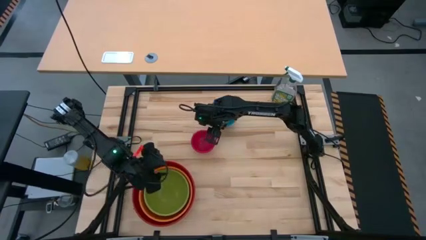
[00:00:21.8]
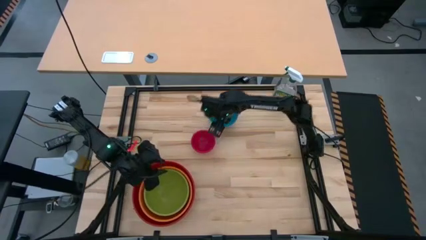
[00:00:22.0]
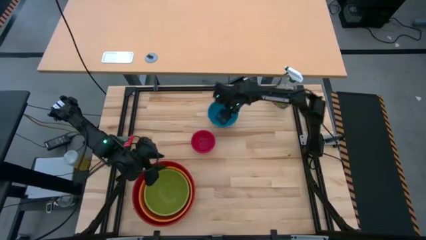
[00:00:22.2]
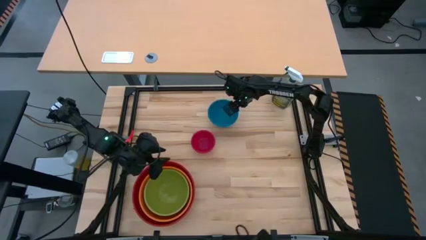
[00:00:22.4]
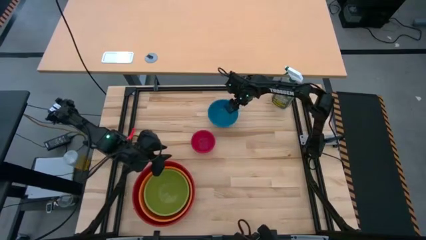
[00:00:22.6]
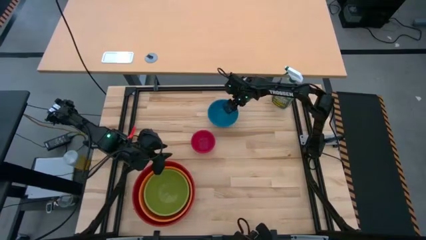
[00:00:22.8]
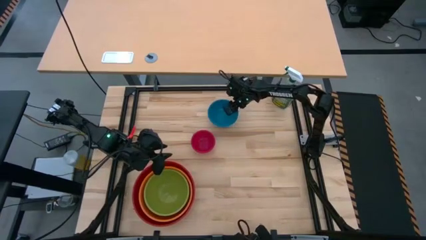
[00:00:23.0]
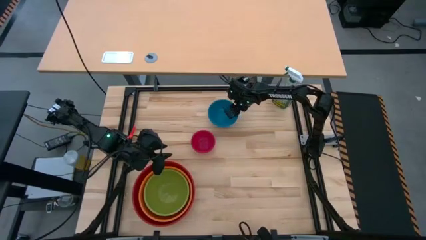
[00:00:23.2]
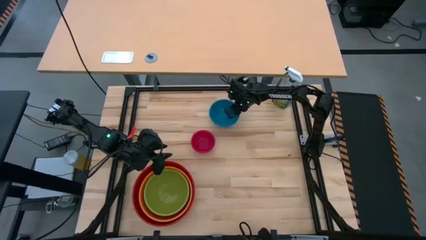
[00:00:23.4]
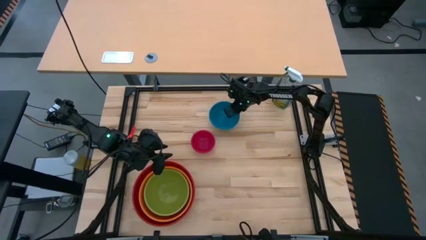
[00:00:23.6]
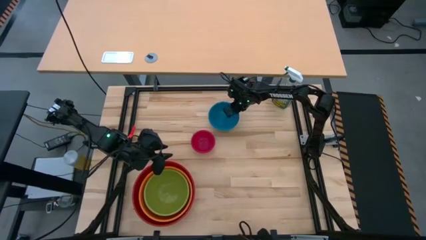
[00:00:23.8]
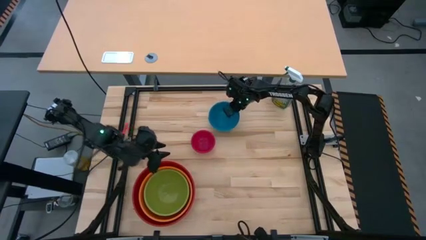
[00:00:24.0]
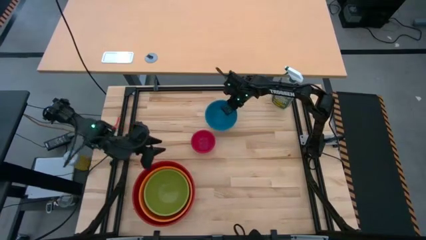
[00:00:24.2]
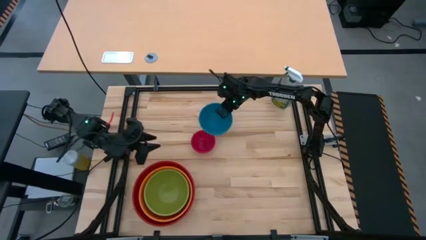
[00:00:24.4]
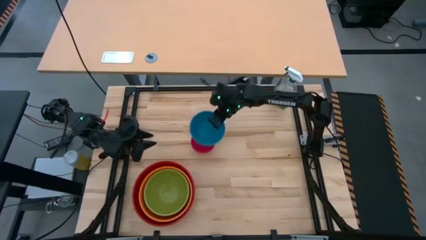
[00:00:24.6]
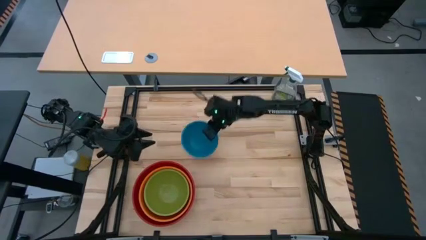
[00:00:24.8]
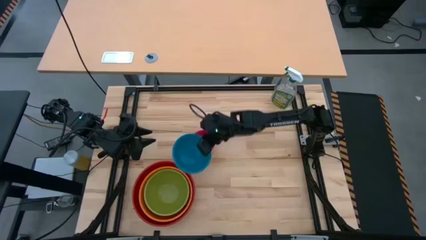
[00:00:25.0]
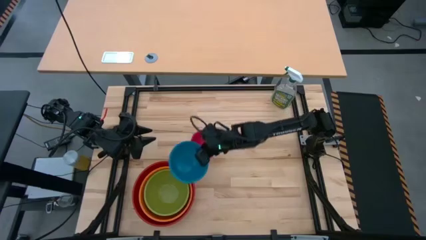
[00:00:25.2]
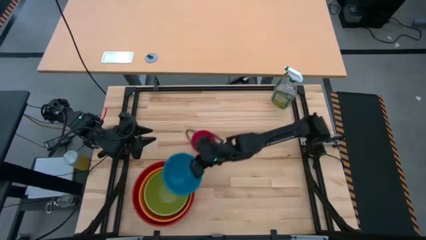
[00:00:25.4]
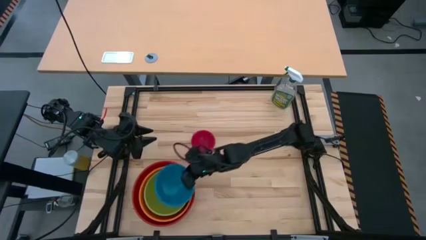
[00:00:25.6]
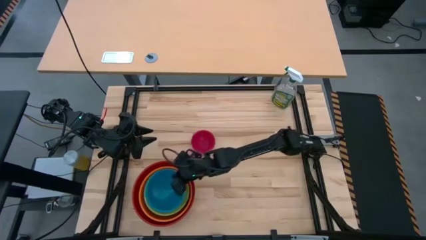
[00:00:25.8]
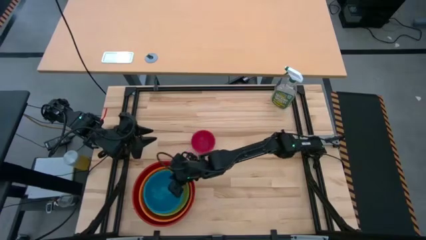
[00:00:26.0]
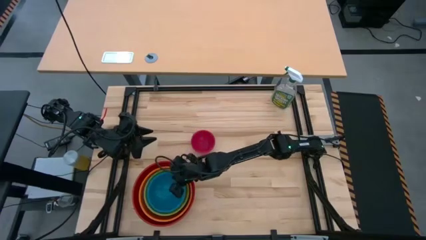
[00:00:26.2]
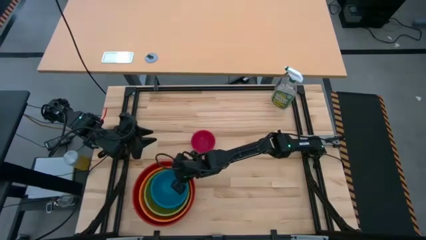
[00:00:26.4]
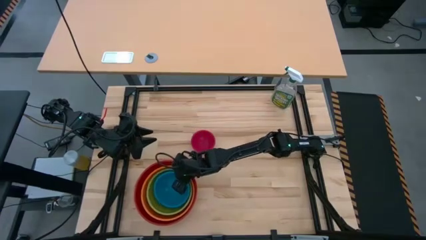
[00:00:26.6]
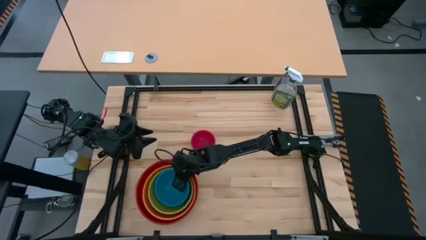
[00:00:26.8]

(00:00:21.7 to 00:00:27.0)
Stack the blue bowl on top of the green bowl

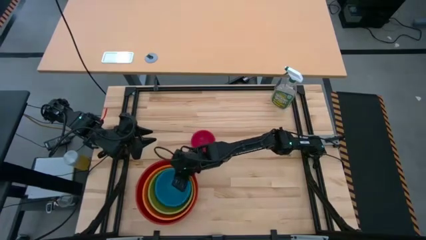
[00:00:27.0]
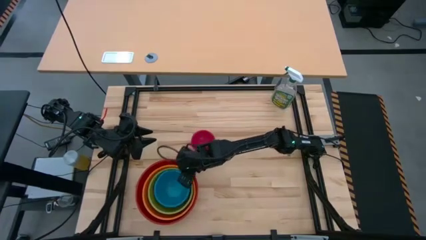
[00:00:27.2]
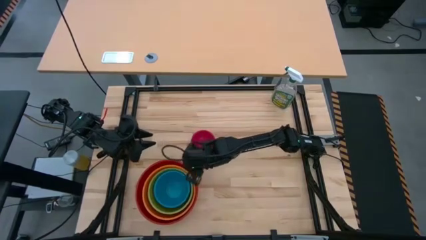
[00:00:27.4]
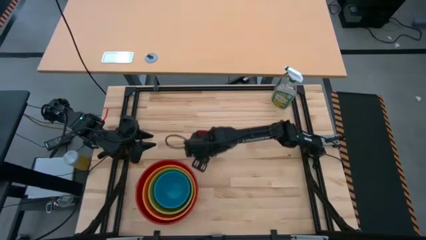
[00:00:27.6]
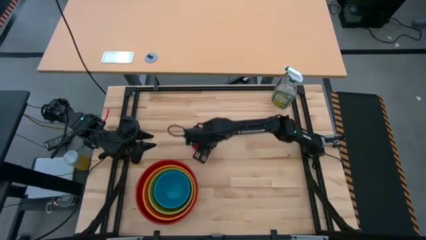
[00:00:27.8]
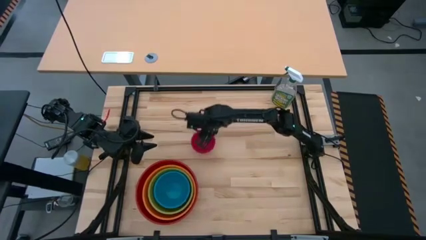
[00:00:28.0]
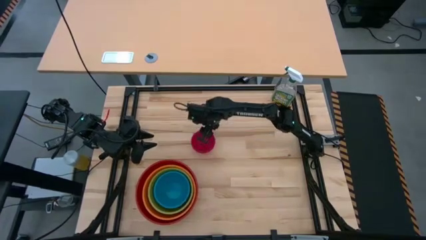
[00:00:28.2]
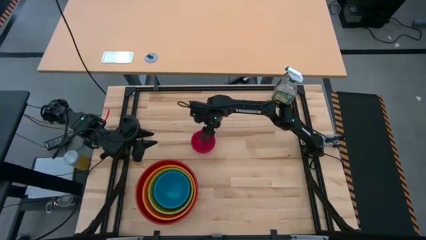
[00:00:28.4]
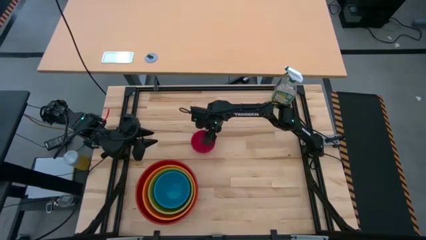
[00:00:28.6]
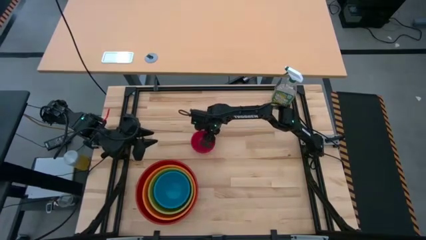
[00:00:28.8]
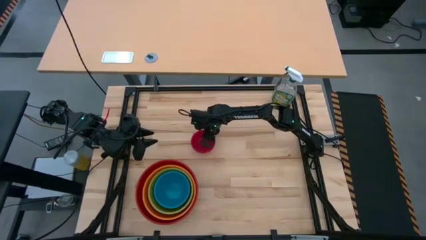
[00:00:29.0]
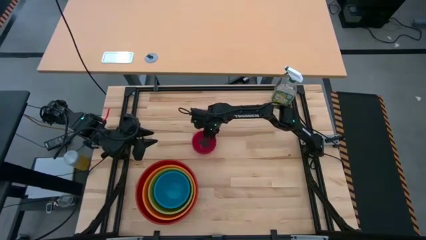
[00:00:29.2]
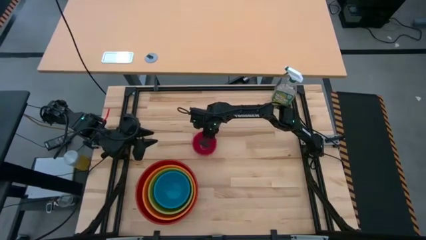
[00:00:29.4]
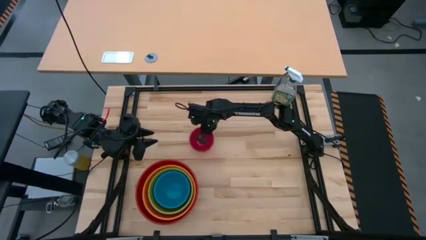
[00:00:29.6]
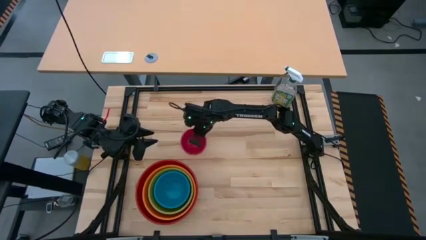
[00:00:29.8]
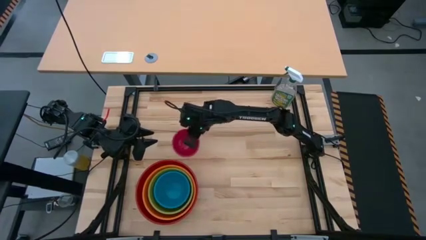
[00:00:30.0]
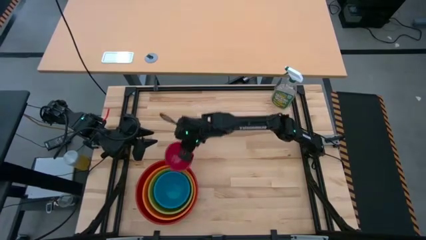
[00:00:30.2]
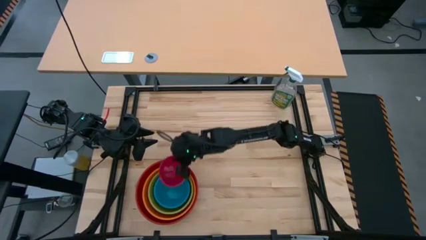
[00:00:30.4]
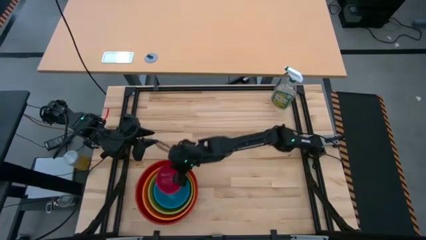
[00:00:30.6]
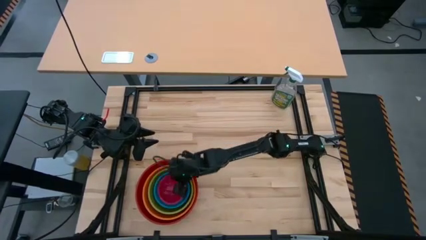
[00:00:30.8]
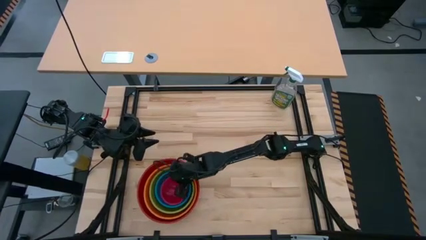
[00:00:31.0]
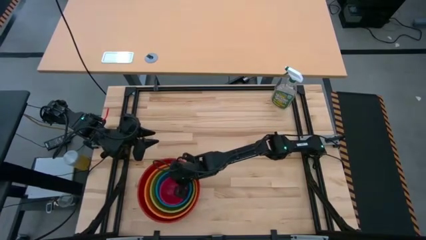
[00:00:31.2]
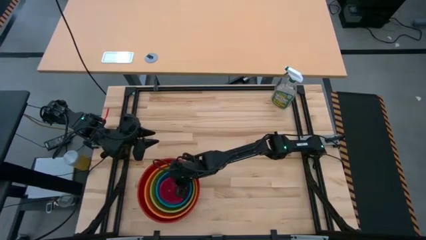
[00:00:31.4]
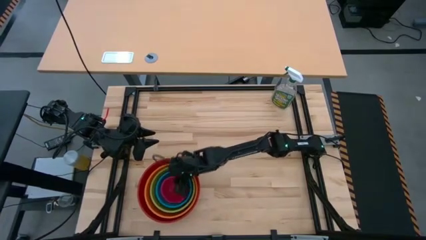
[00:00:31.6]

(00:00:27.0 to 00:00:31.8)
Stack the red bowl on top of the blue bowl

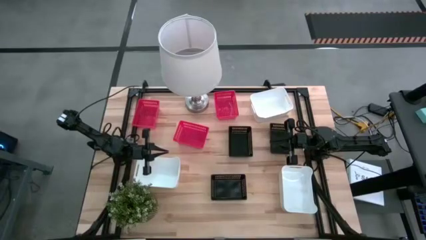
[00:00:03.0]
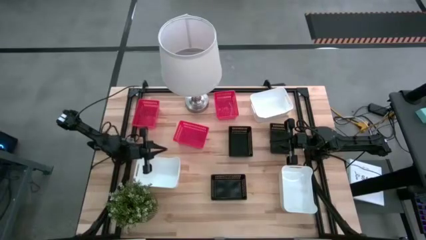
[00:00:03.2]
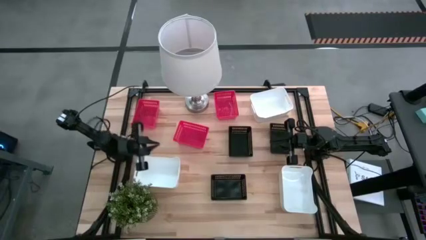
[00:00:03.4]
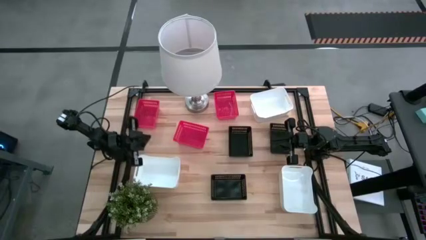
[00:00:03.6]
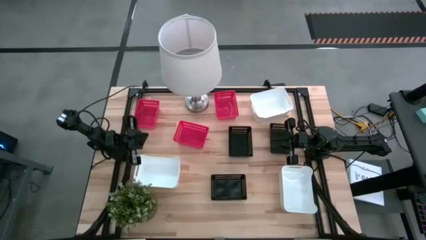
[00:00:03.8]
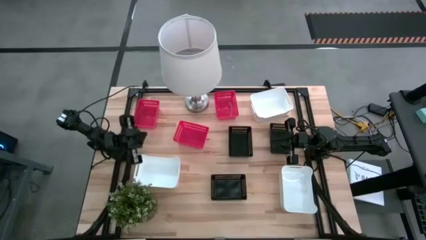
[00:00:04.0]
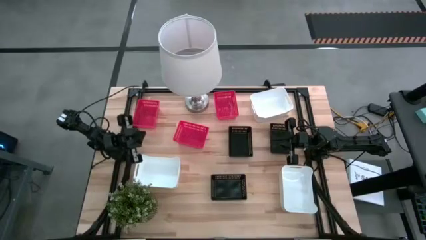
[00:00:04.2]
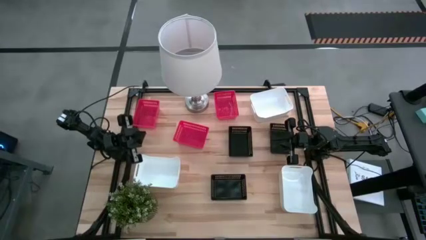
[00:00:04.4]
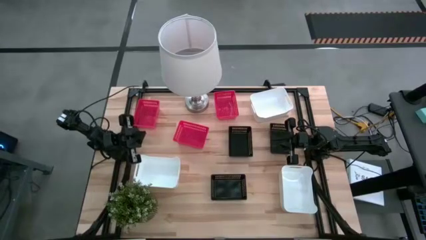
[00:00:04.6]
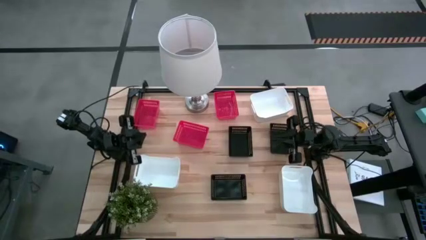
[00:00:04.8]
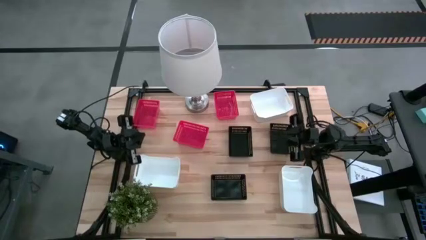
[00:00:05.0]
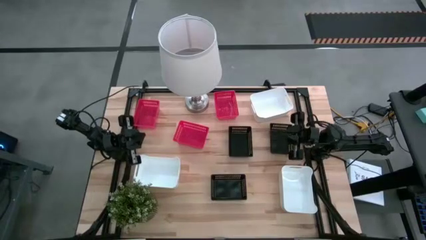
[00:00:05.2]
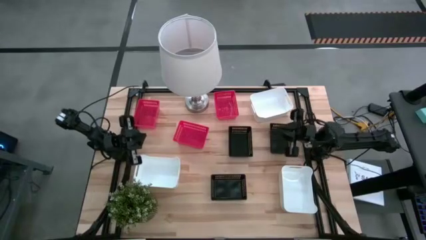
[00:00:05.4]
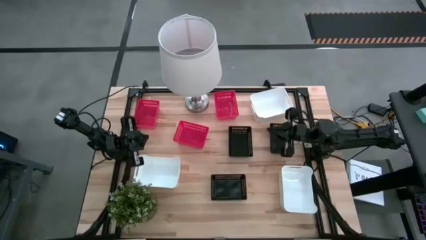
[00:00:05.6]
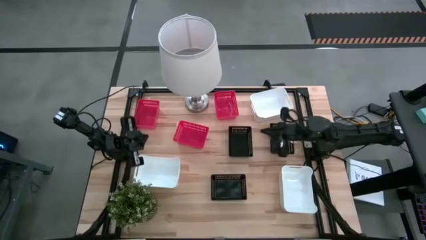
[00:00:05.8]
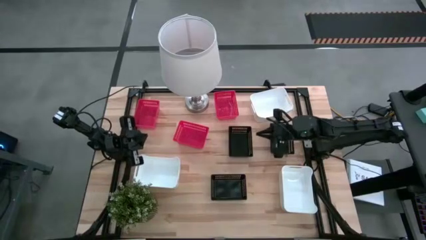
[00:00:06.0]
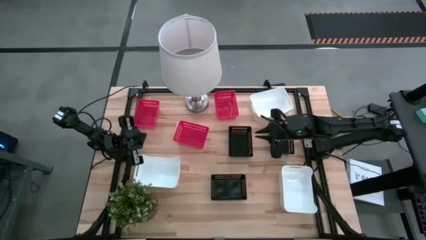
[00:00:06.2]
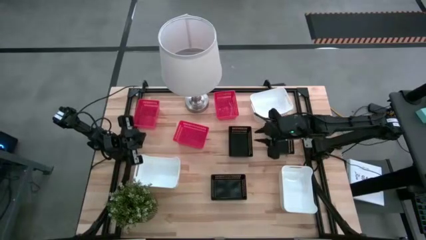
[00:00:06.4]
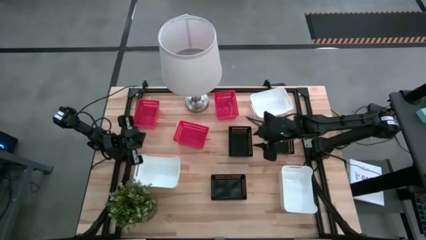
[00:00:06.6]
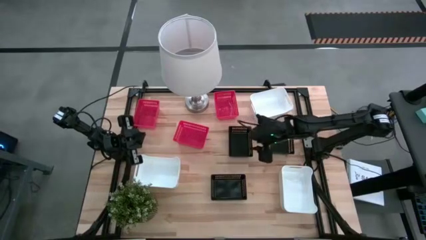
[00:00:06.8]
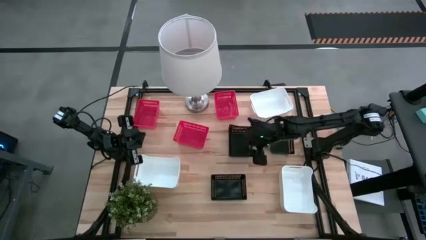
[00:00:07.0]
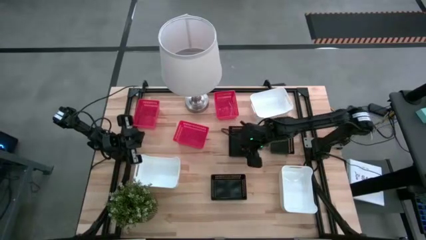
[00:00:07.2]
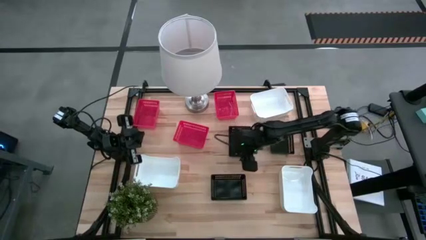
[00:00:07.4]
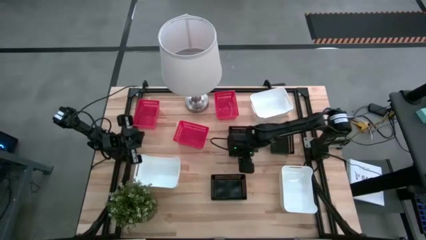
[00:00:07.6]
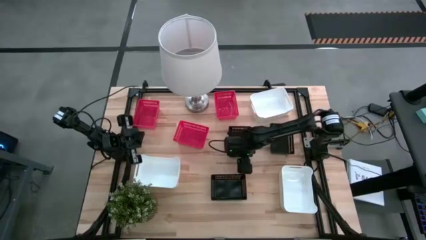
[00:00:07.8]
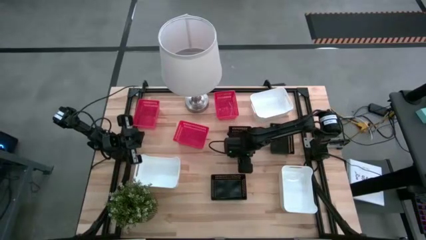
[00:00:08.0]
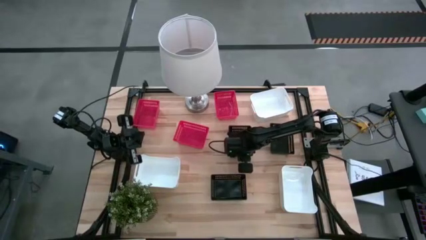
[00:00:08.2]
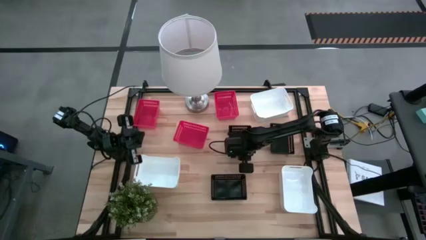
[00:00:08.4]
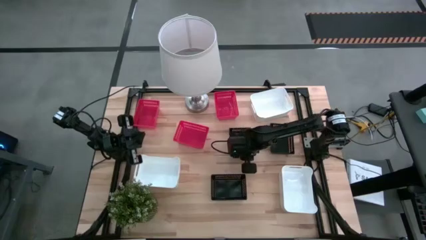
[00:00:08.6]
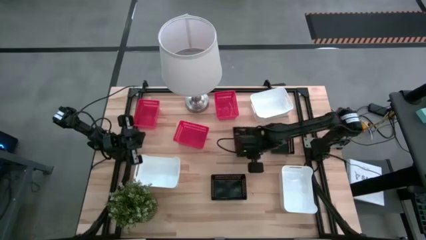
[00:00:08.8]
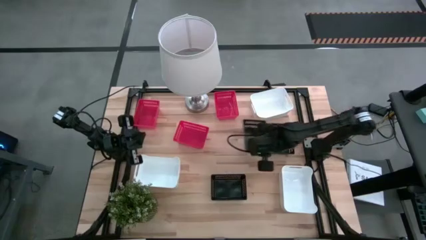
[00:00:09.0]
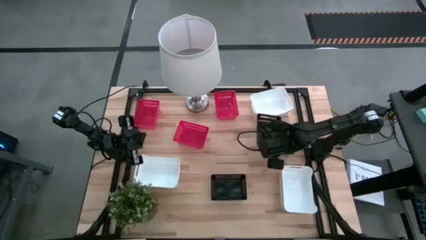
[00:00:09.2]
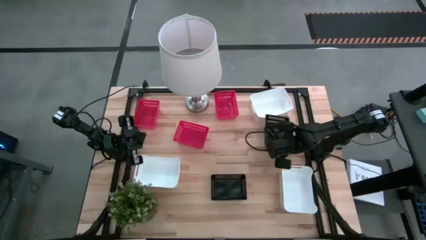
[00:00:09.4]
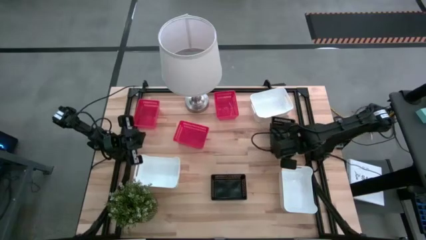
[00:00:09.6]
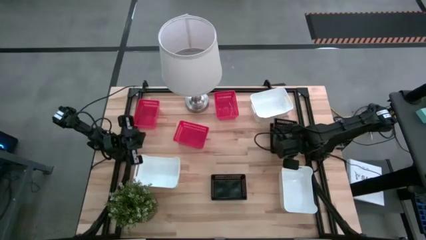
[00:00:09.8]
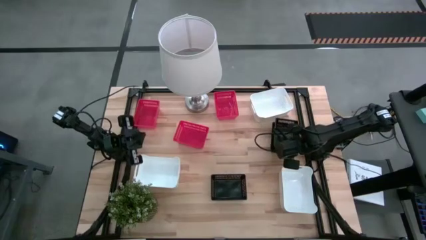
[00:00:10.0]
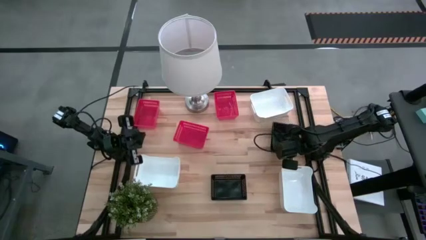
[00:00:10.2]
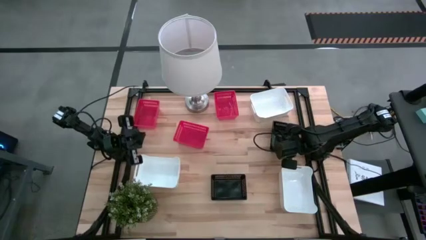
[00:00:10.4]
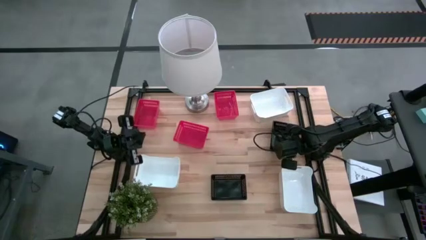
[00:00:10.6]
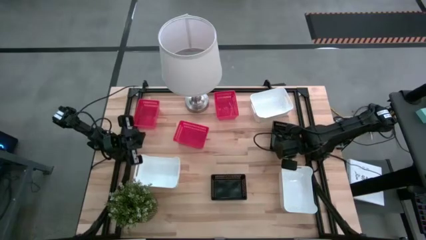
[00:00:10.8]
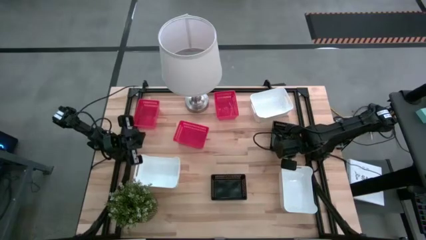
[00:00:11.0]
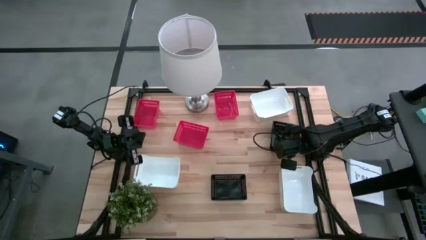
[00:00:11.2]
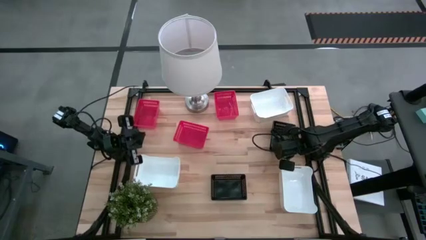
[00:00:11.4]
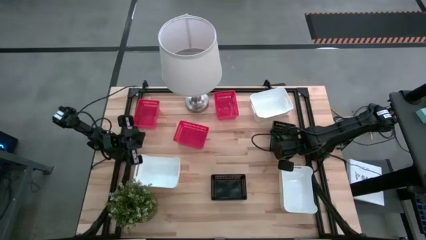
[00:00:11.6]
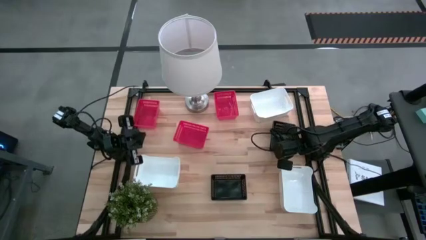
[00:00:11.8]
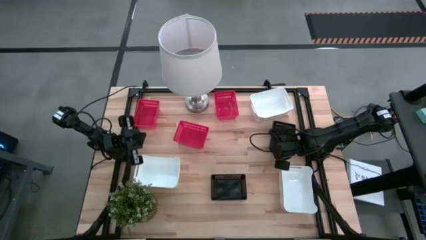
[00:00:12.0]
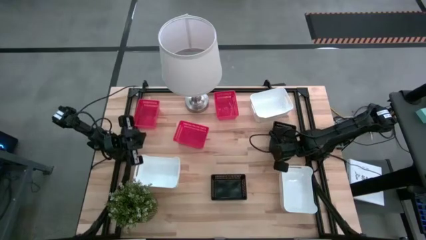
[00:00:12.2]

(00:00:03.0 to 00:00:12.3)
Stack the top left black bin on top of the top right black bin
